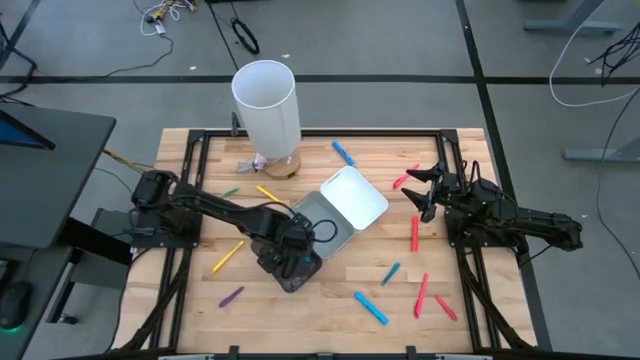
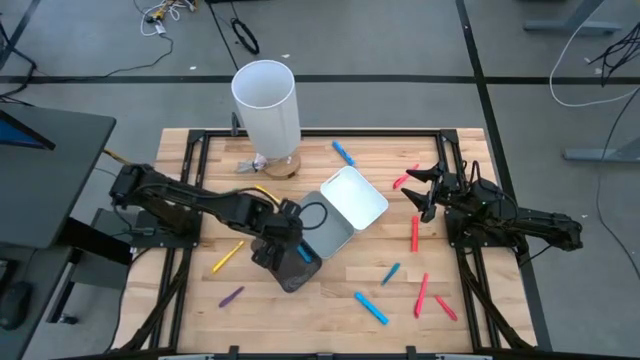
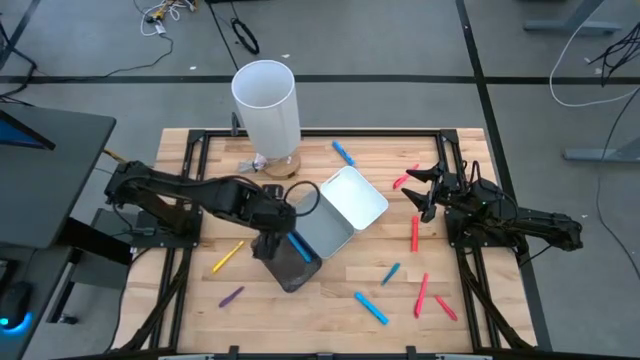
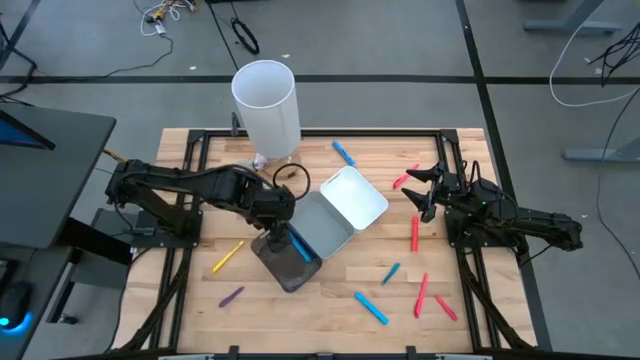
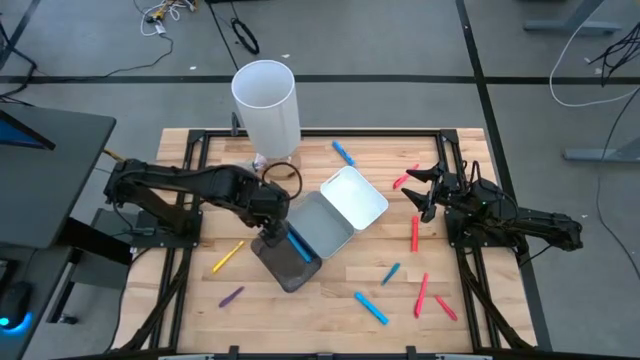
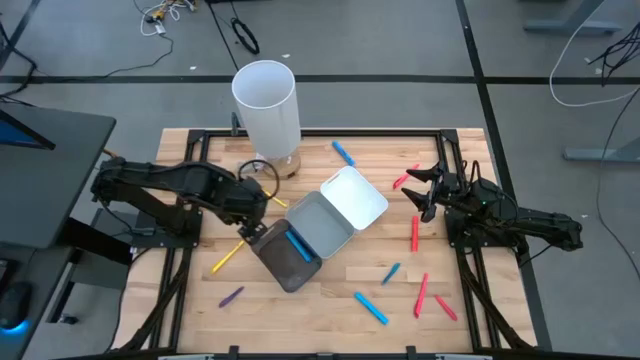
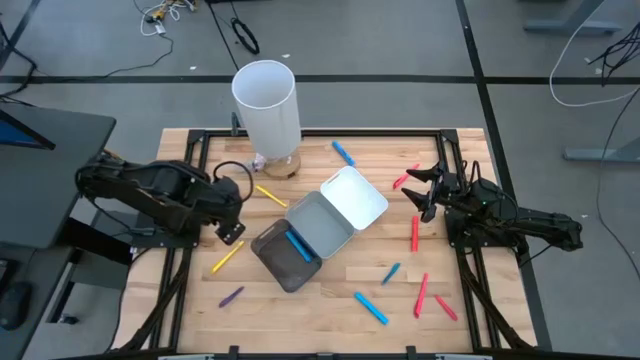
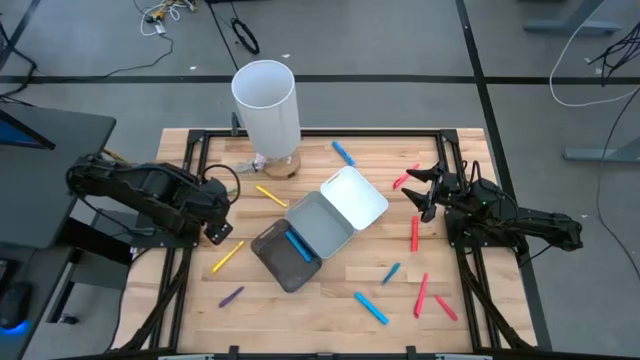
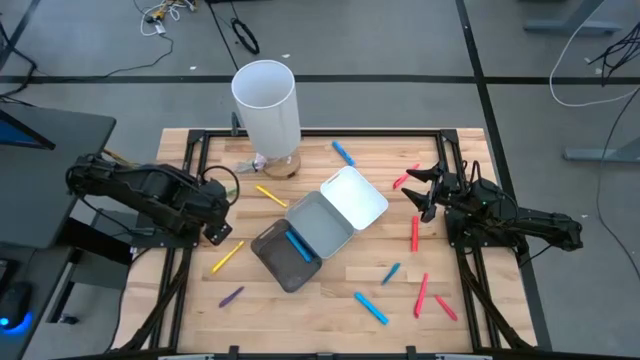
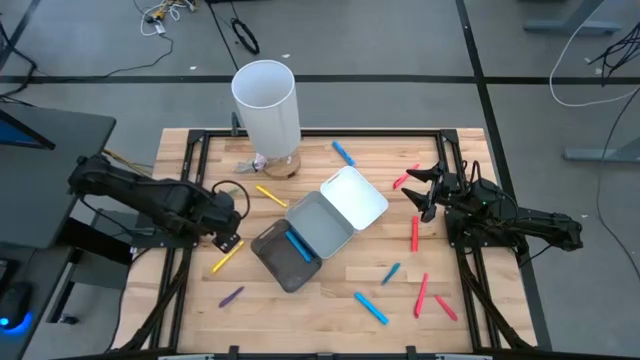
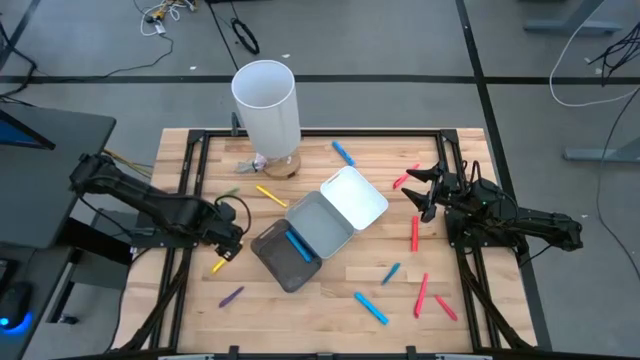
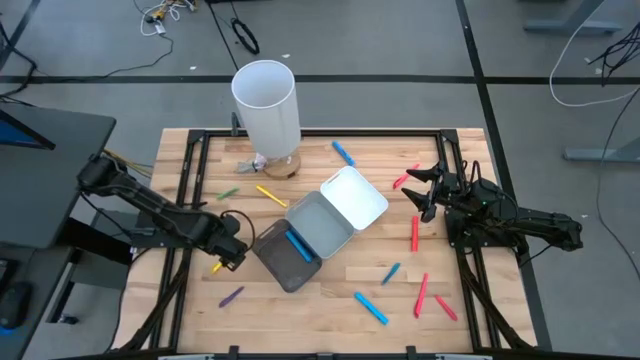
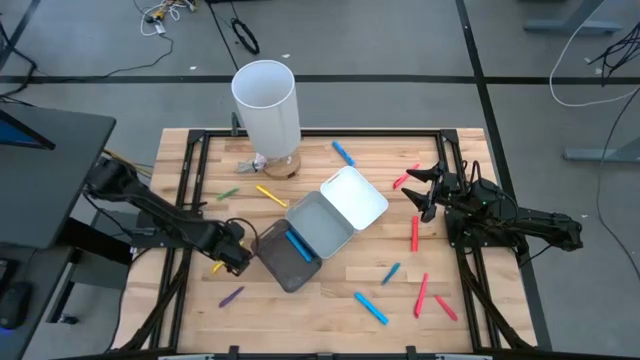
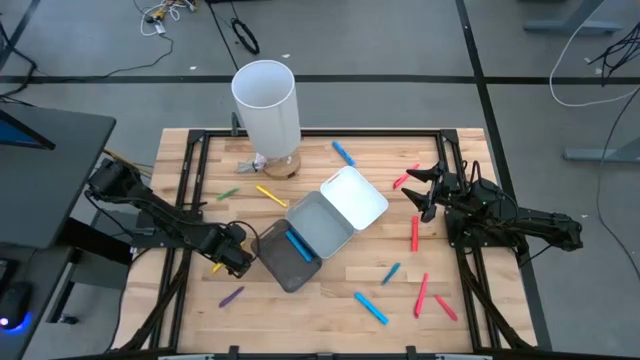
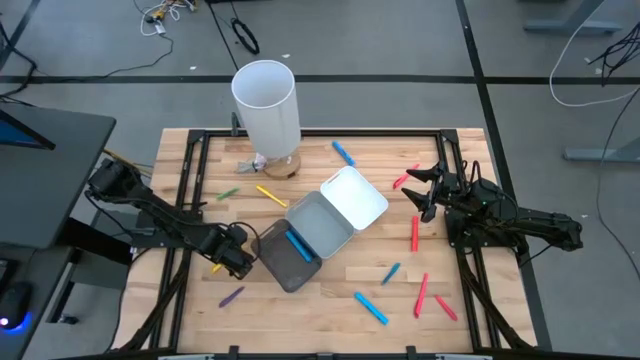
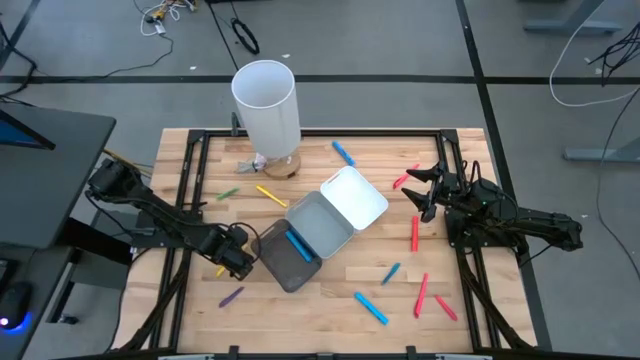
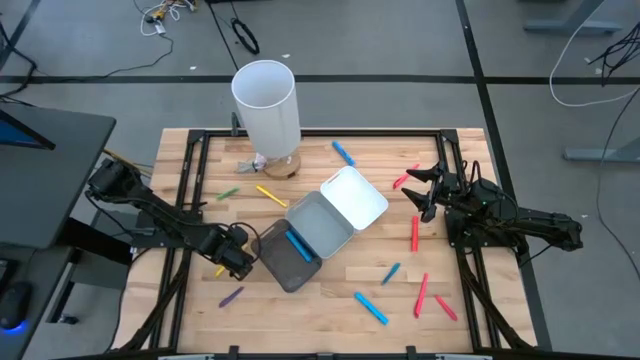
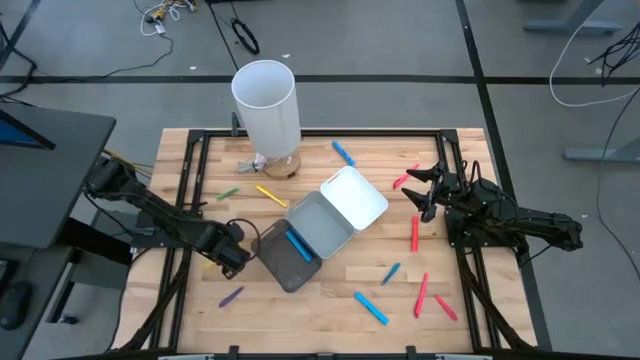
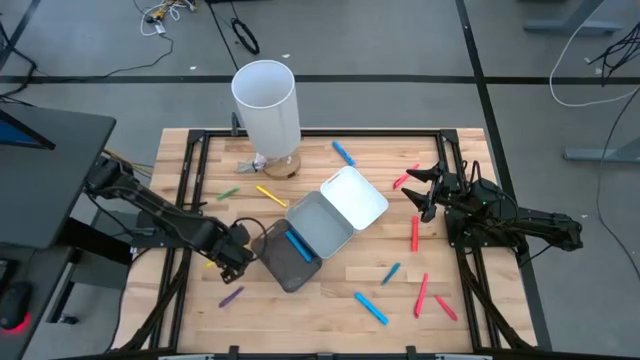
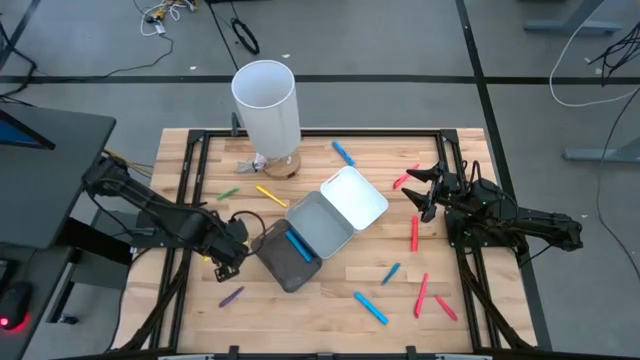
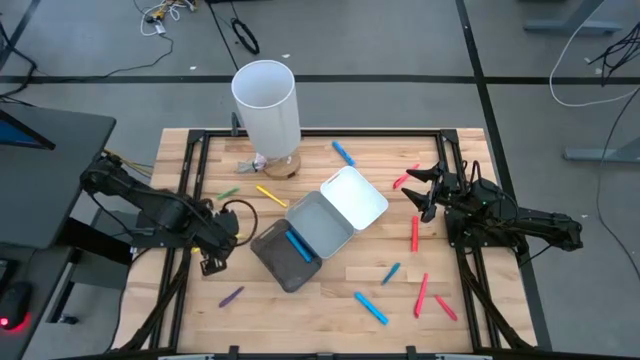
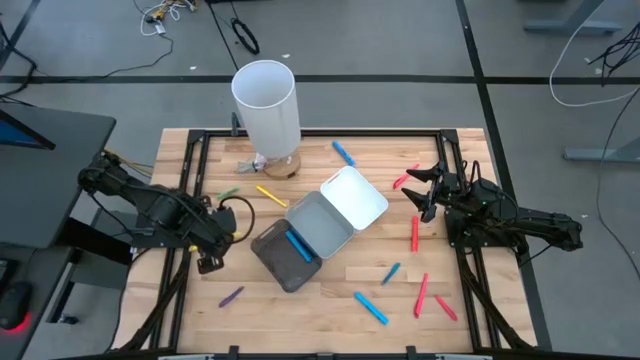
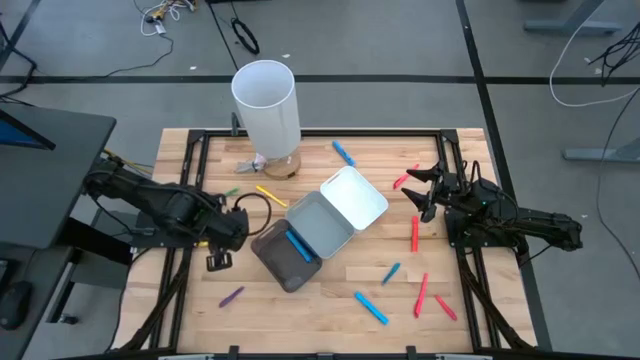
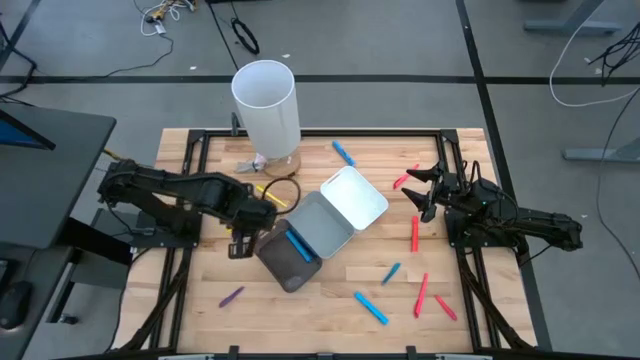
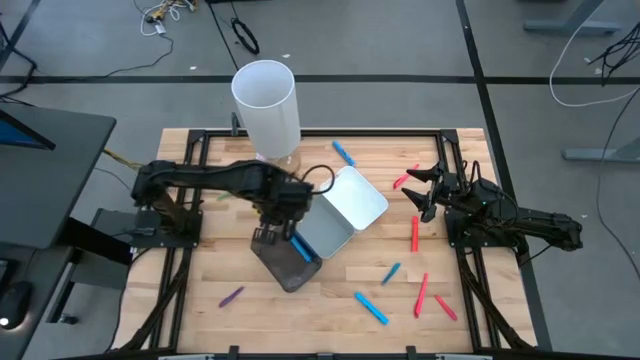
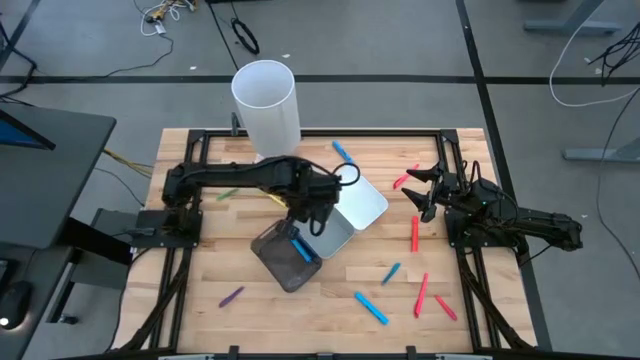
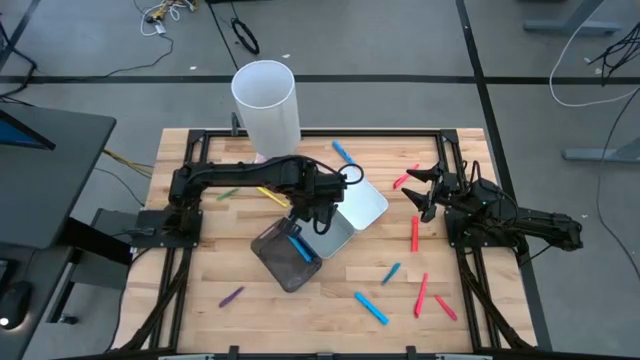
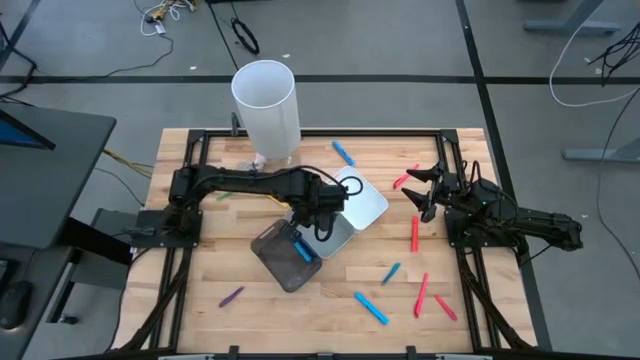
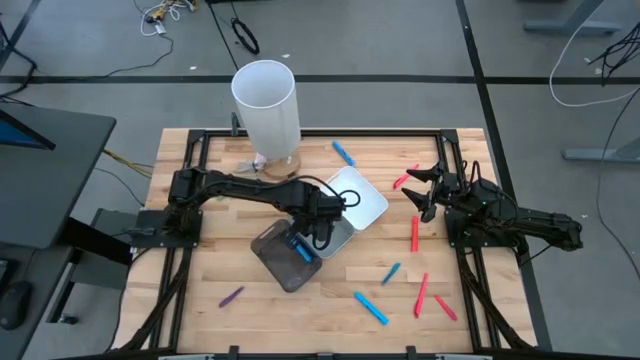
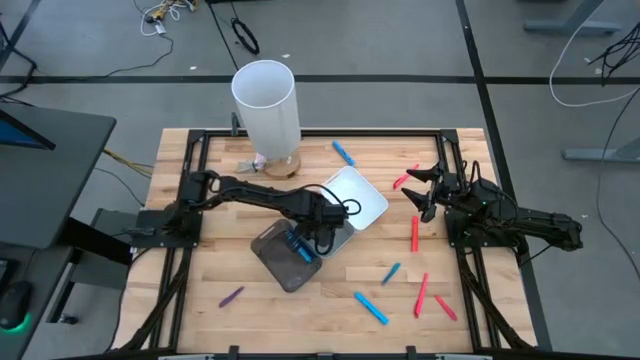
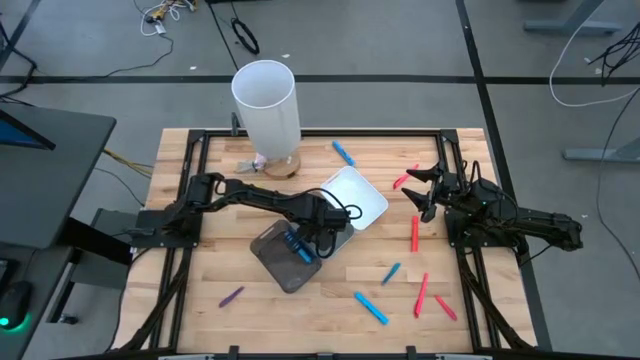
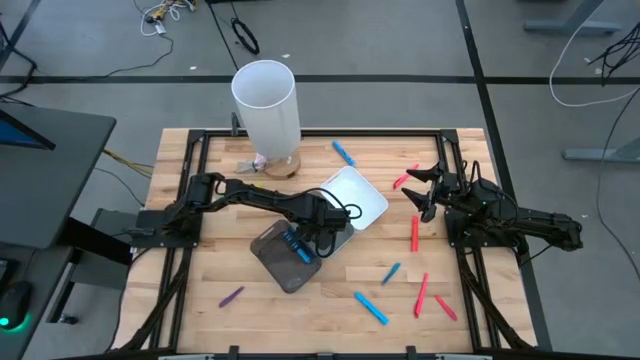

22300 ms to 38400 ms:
Task: Pick & Place Markers
Put the bottom yellow marker into the gray bin

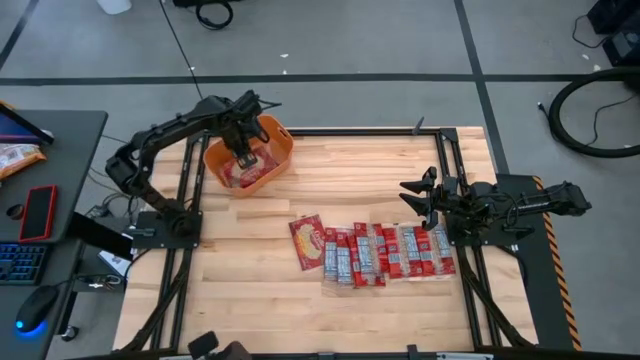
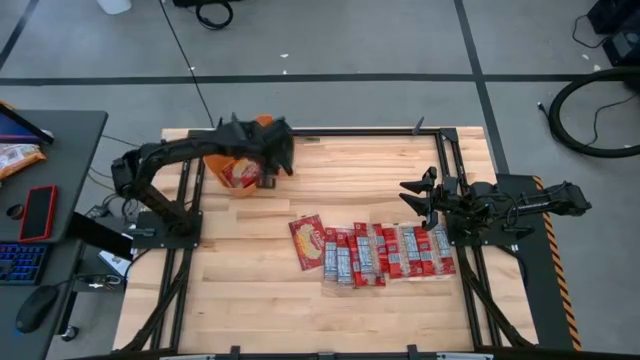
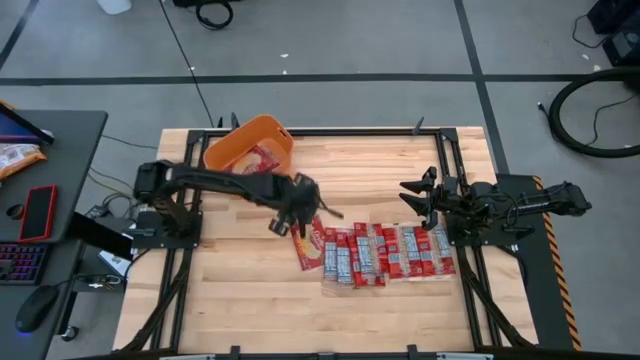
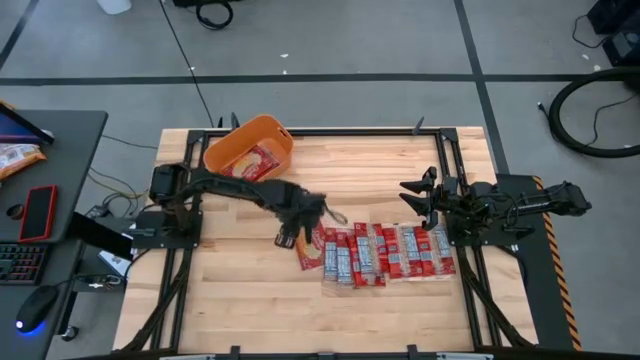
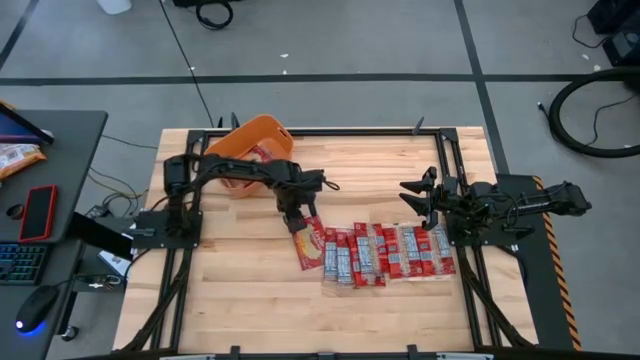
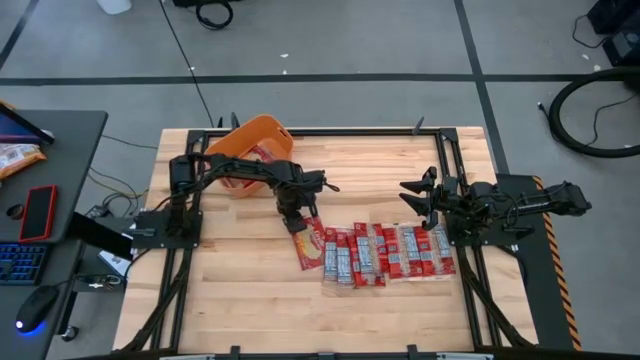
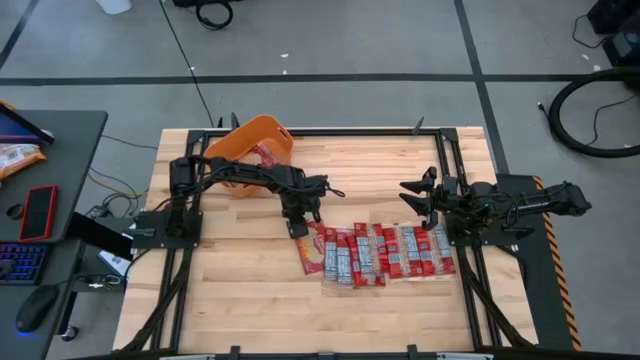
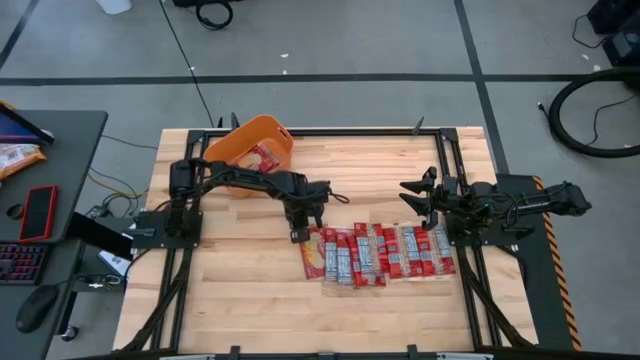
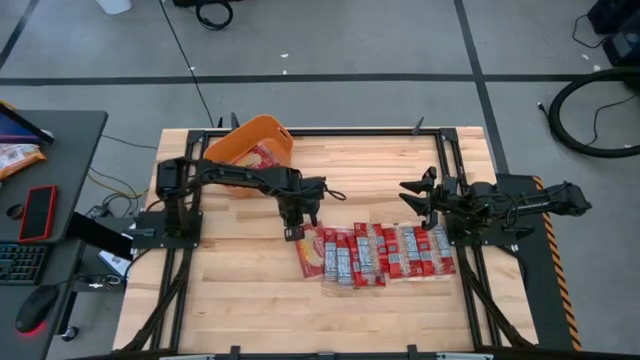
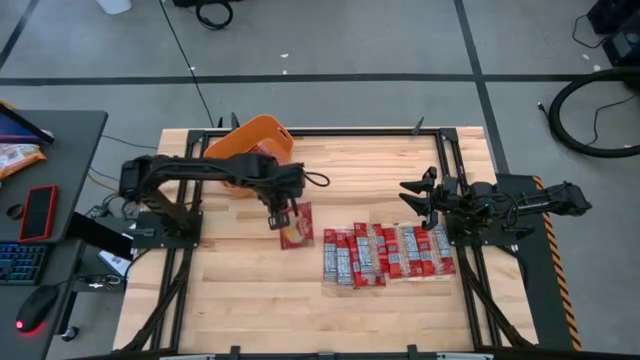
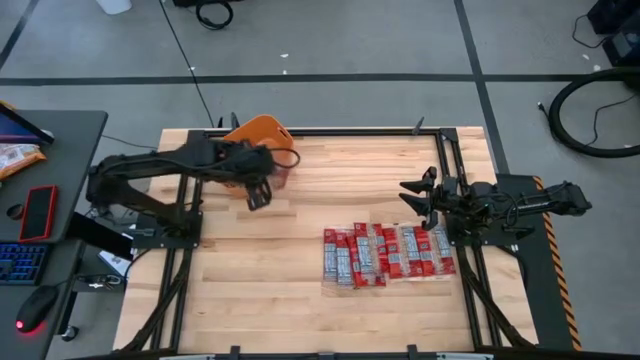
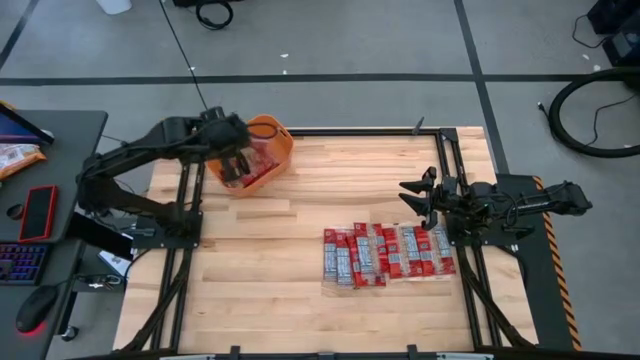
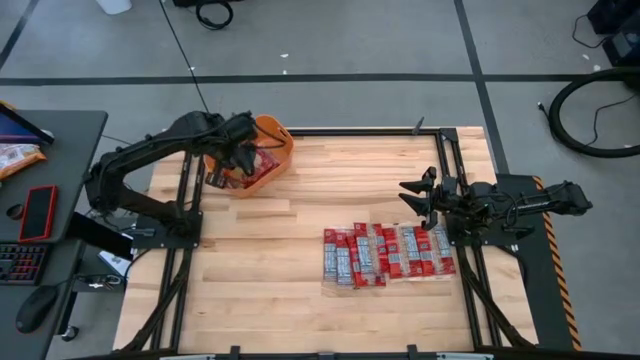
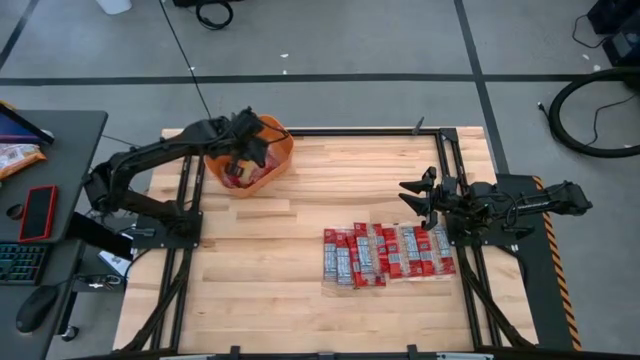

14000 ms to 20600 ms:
Task: Sort popcorn bags into baskets
Put the red popcorn bag into the orange container
